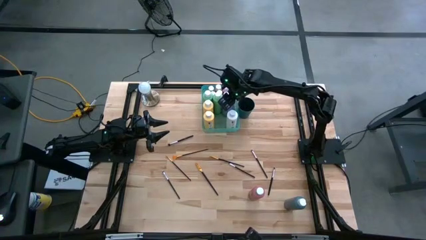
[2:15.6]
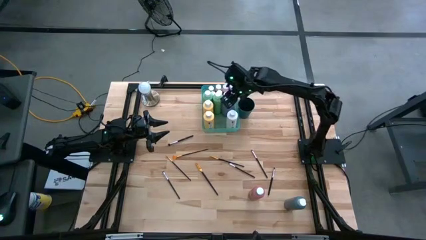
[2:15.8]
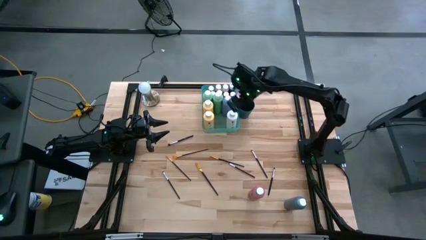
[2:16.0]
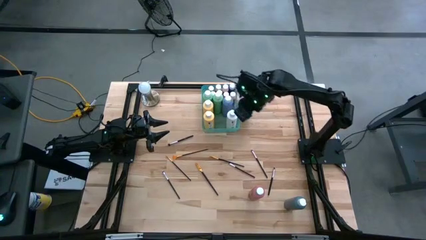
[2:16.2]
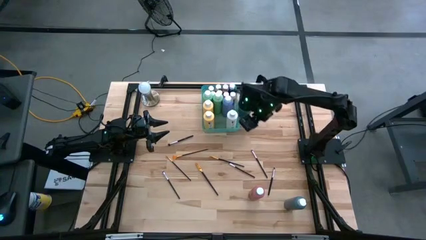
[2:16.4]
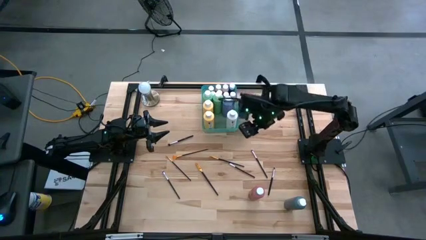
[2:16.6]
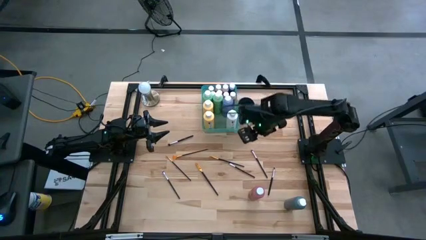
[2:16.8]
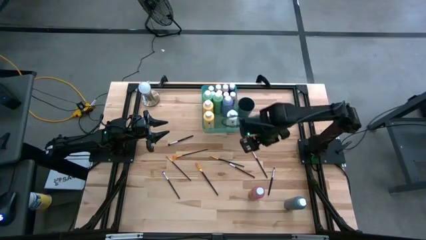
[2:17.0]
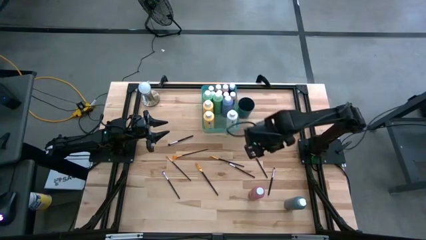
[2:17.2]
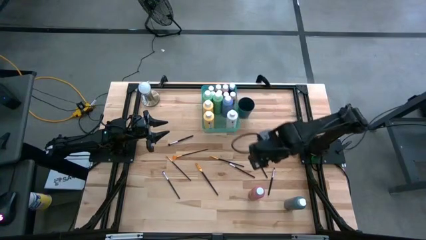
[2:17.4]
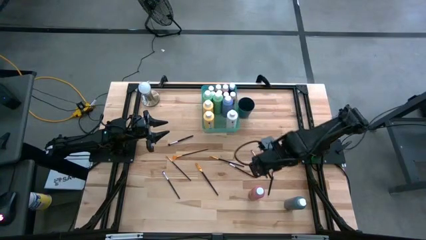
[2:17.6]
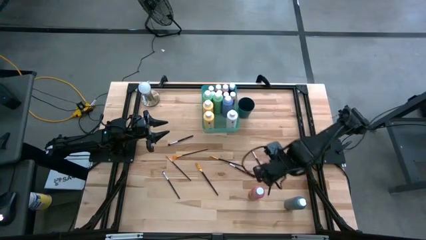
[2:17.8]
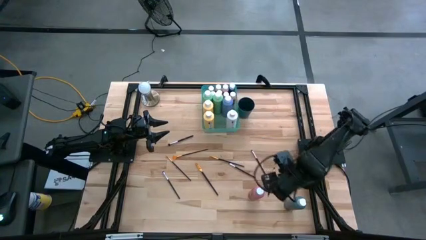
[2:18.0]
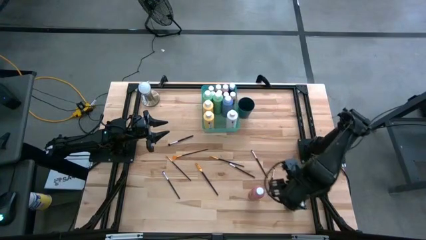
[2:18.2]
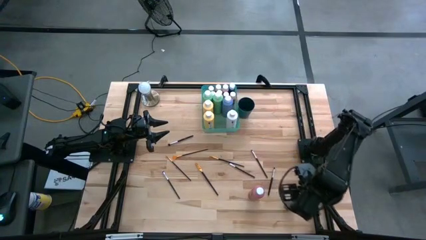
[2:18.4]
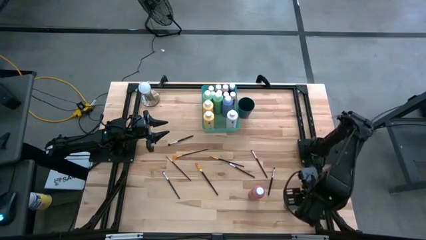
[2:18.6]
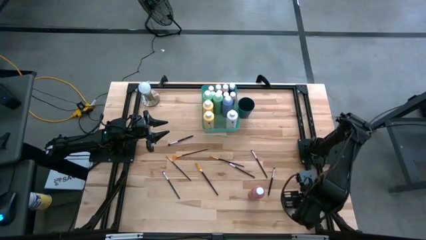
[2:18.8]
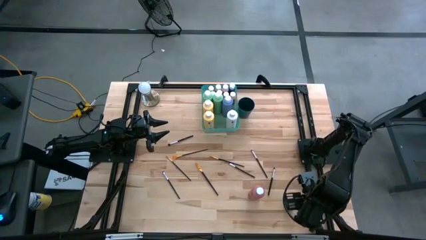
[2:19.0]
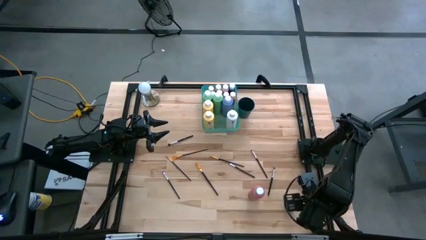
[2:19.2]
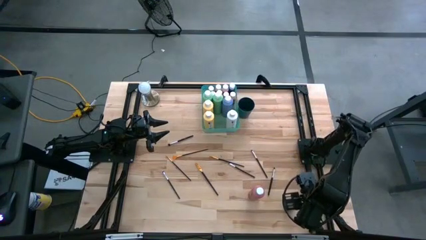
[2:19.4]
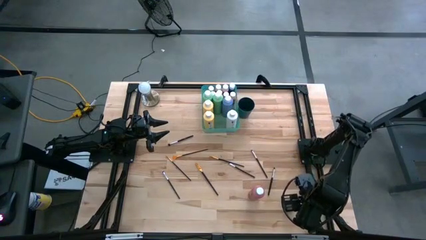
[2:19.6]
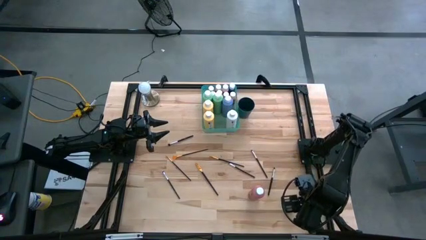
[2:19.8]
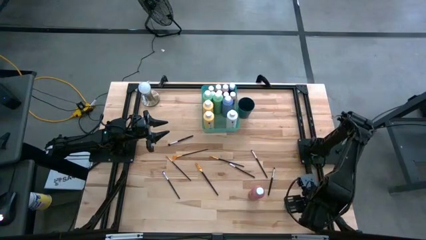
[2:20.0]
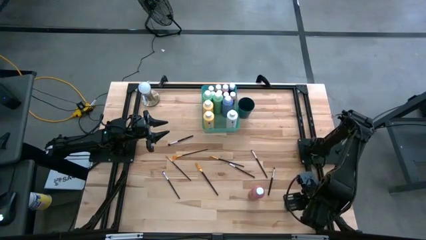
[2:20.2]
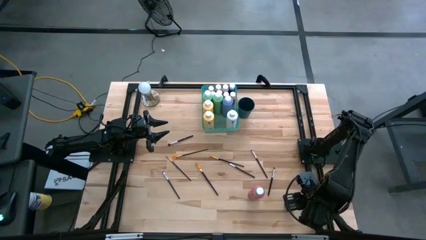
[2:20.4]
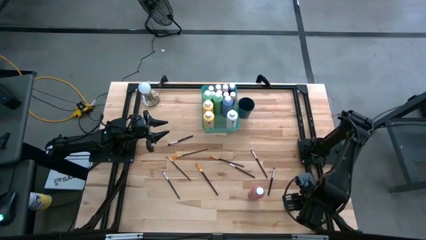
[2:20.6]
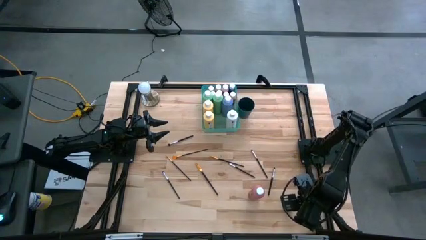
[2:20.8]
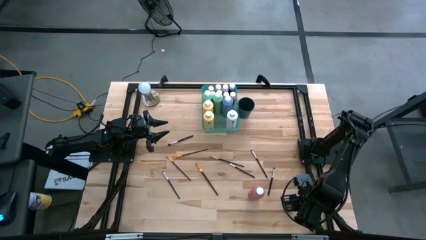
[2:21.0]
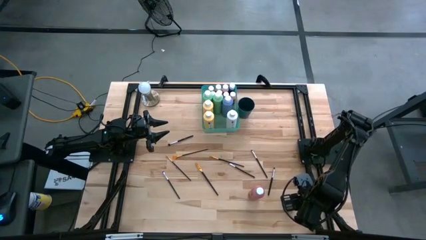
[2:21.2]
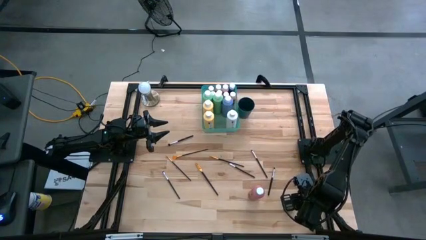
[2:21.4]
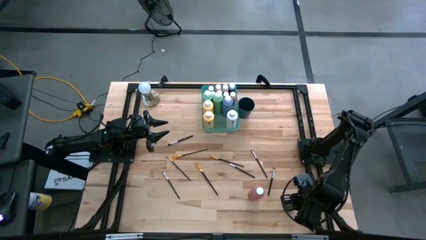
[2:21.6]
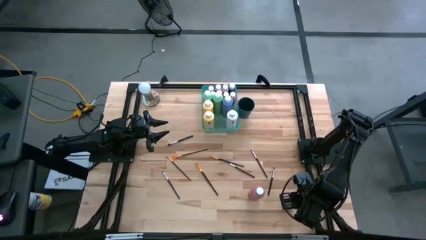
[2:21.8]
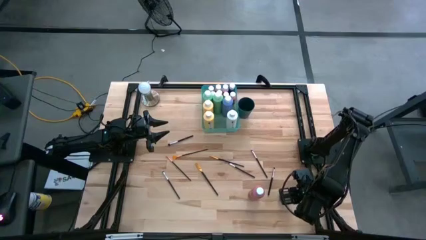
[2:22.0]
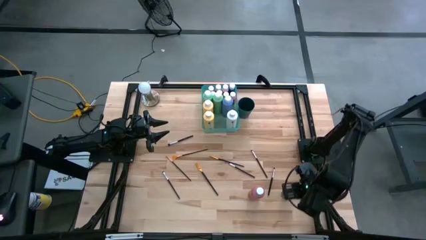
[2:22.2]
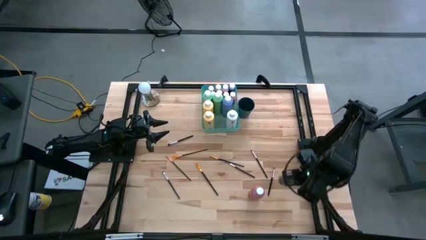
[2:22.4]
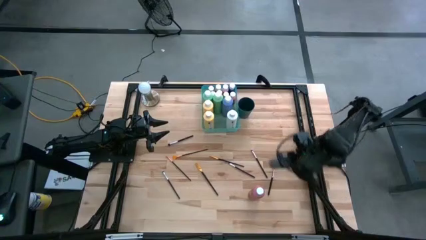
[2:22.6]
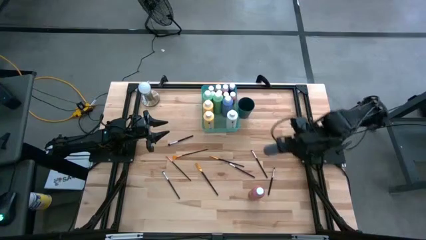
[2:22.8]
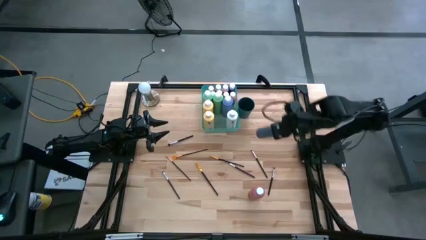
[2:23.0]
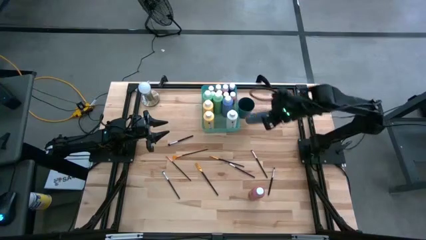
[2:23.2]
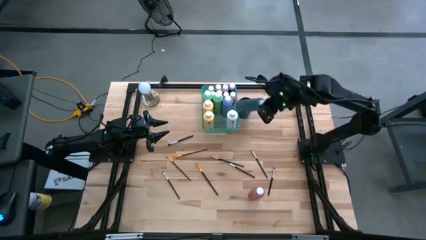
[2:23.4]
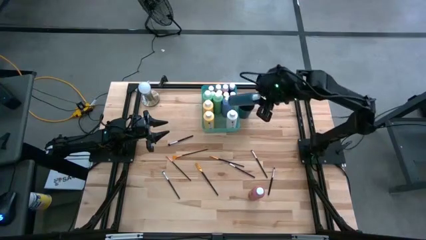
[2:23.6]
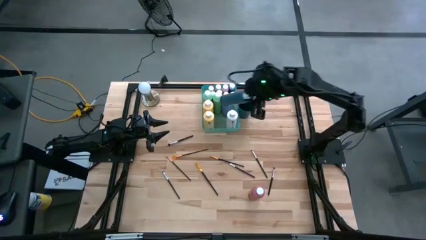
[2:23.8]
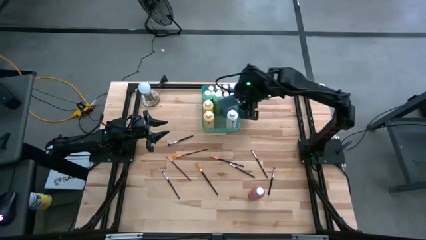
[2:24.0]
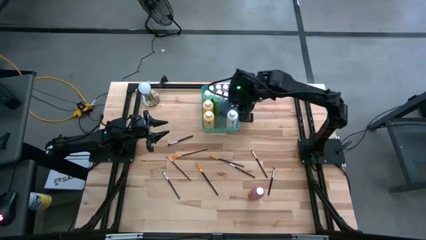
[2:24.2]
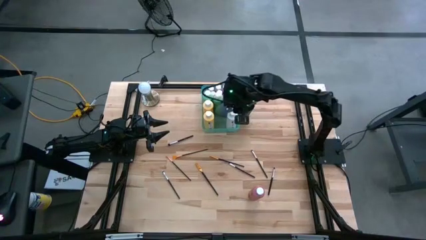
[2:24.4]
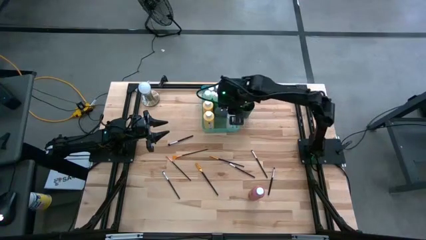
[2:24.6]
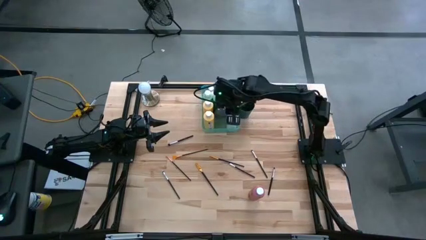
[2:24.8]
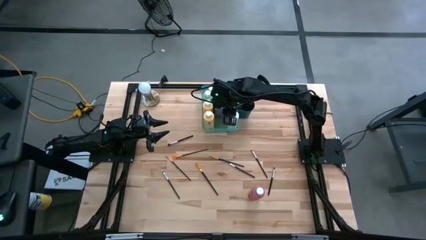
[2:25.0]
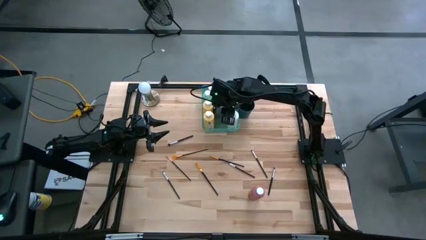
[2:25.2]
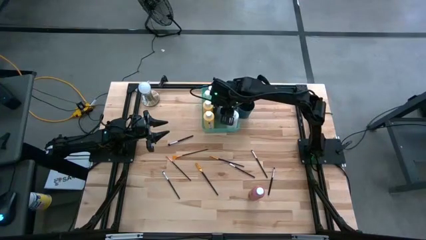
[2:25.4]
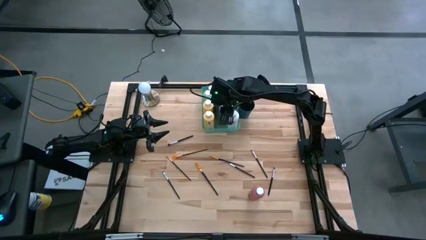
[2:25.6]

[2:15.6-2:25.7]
Task: Pick & Place Paint Supplies
Put the dark blue paint bottle into the green bin

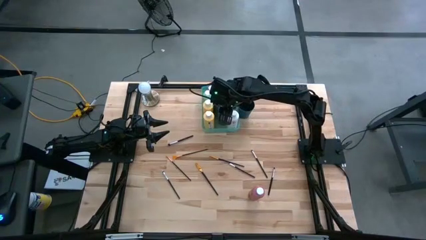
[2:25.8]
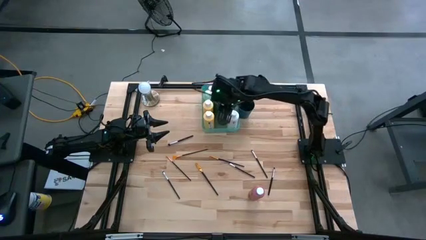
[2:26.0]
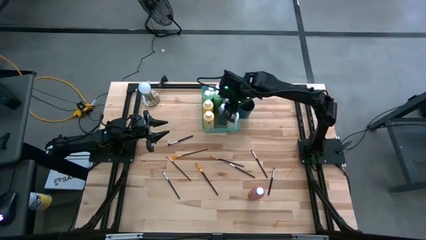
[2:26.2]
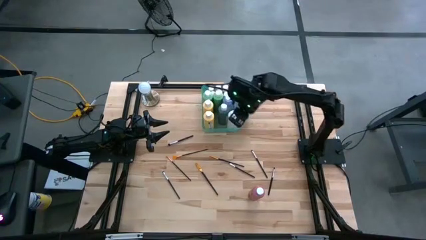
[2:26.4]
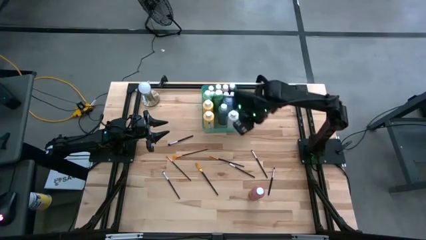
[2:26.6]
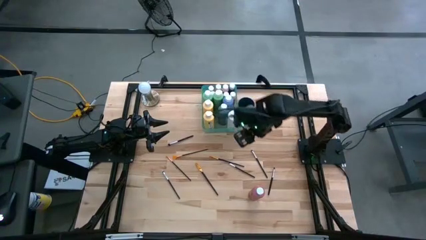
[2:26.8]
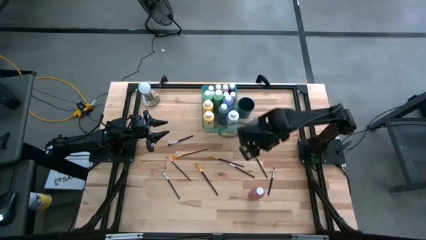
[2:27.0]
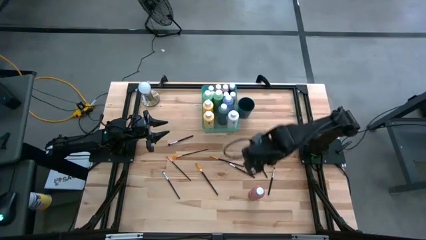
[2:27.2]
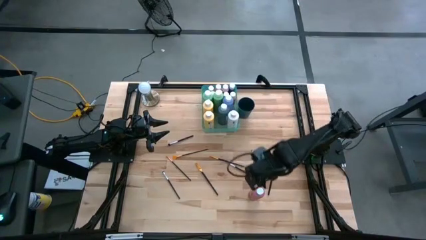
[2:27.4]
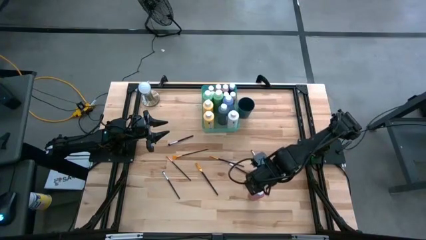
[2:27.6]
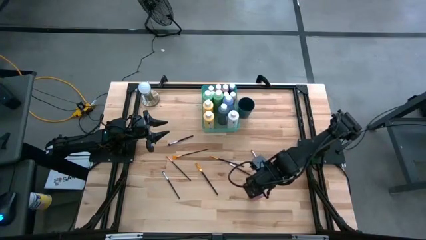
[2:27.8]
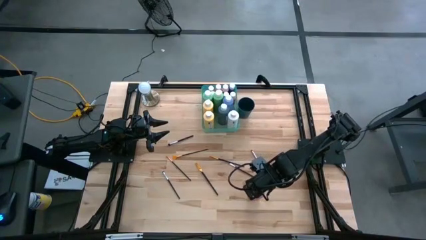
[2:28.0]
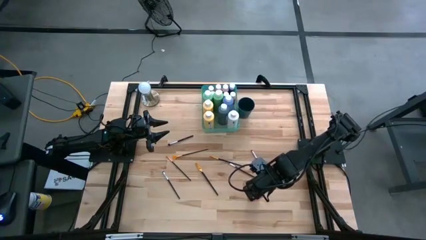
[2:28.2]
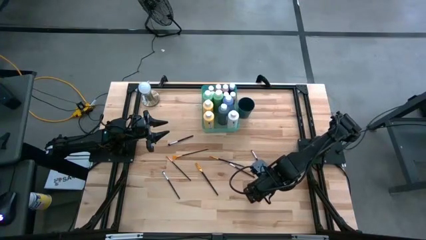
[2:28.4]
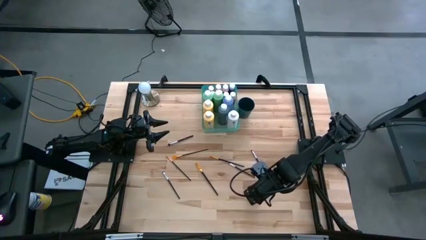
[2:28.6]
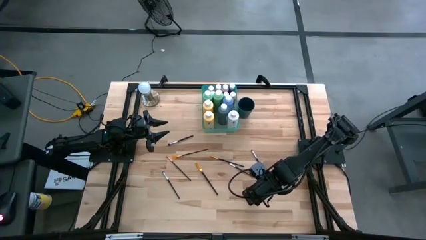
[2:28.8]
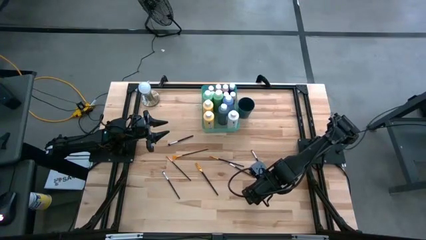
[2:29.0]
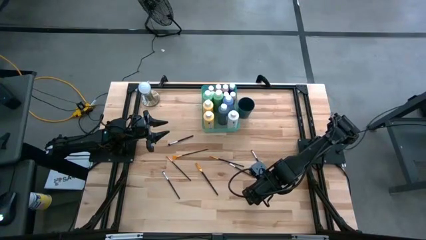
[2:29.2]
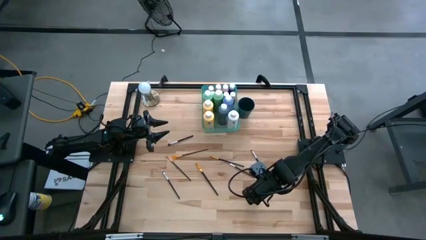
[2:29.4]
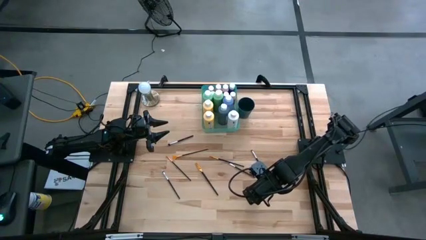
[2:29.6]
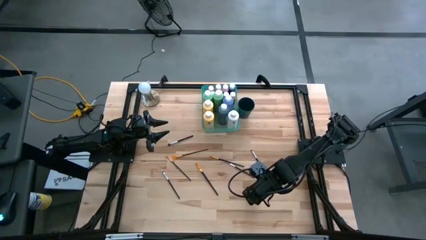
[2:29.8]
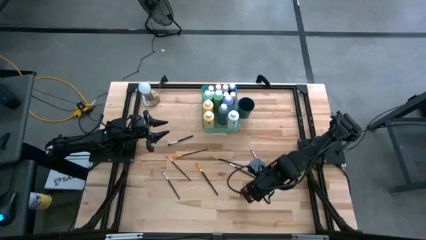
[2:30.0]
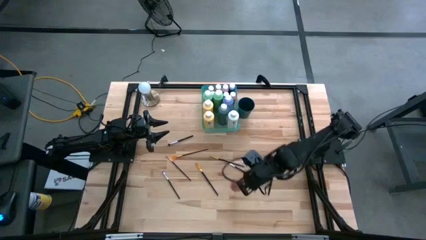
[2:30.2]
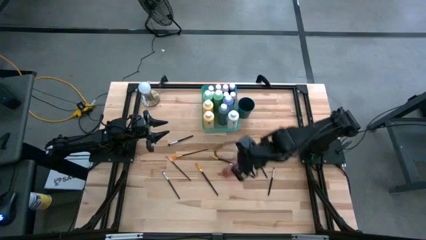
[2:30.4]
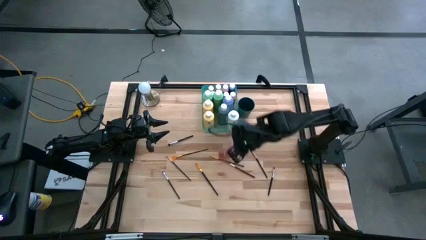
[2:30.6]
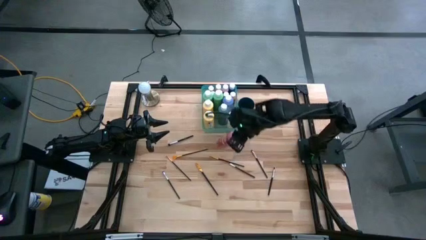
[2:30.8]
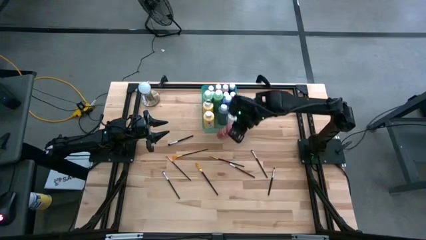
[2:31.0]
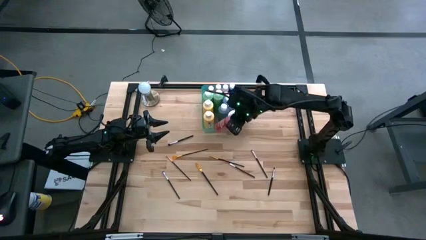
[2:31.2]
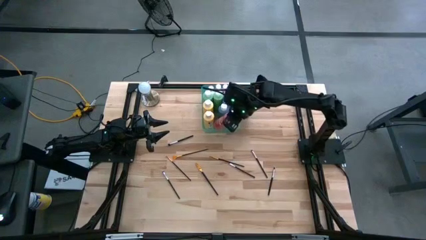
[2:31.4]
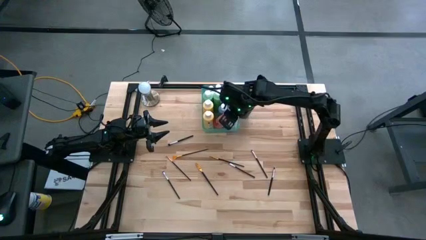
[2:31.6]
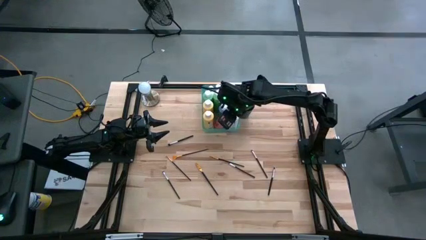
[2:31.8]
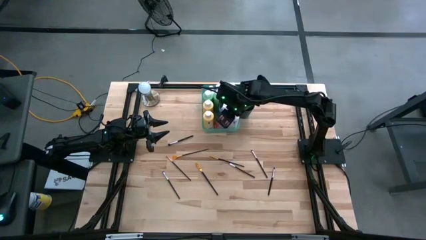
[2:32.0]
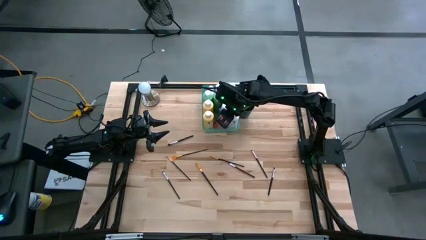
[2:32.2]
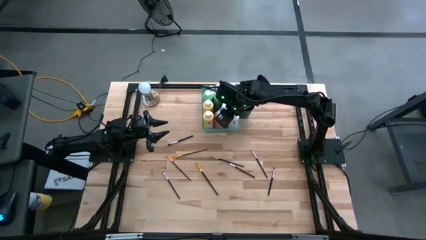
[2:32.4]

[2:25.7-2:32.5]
Put the pink paint bottle into the green bin
